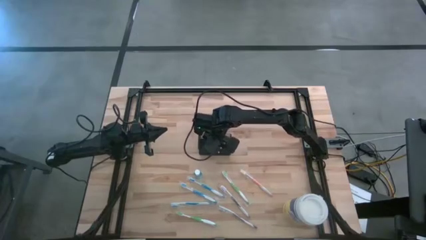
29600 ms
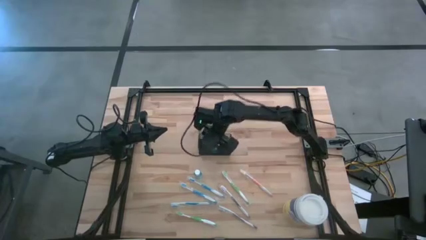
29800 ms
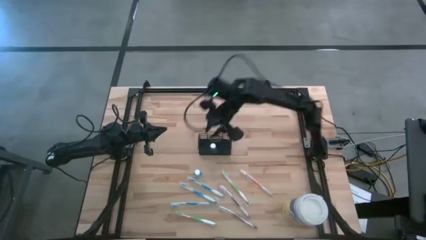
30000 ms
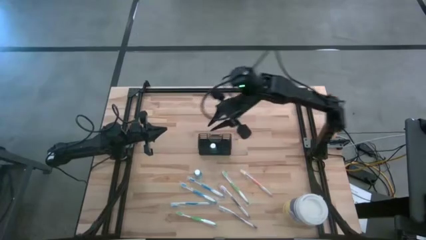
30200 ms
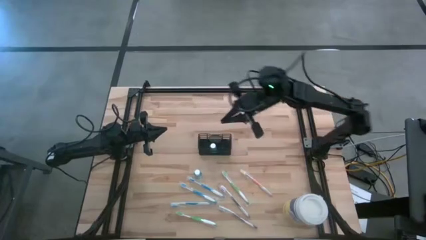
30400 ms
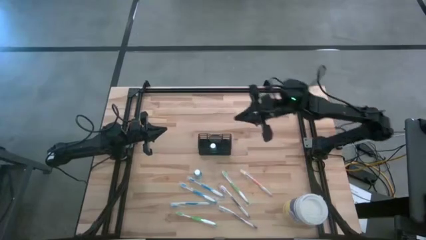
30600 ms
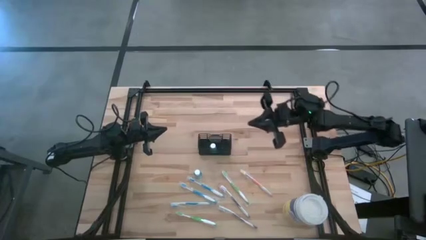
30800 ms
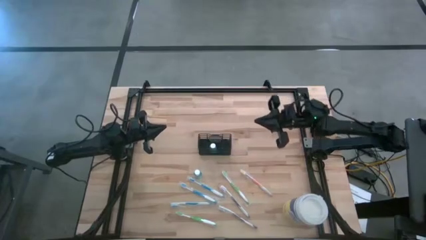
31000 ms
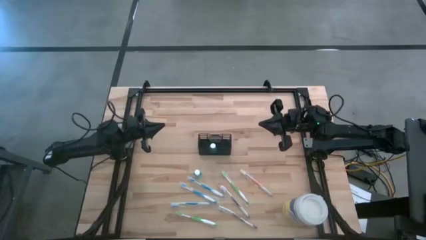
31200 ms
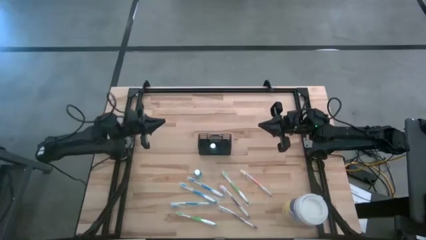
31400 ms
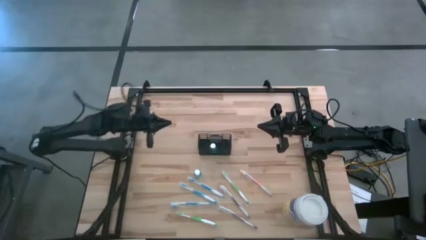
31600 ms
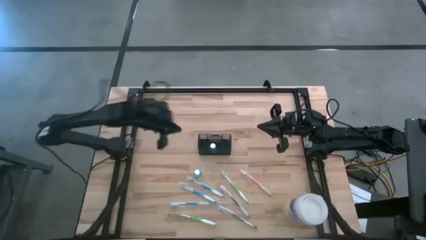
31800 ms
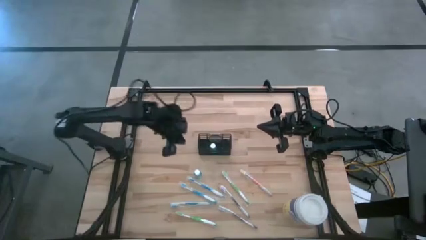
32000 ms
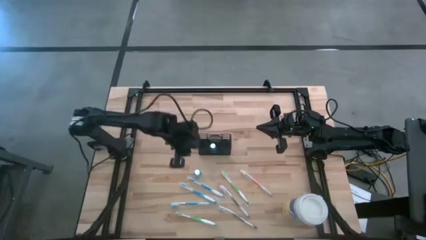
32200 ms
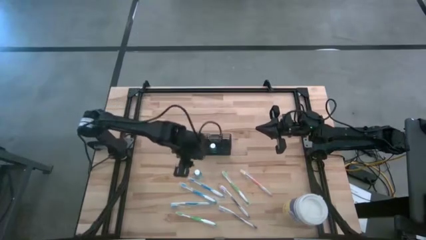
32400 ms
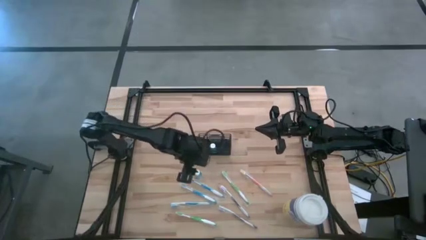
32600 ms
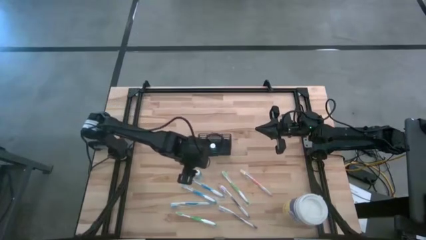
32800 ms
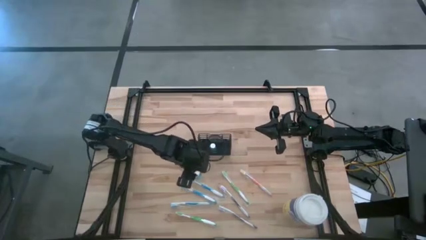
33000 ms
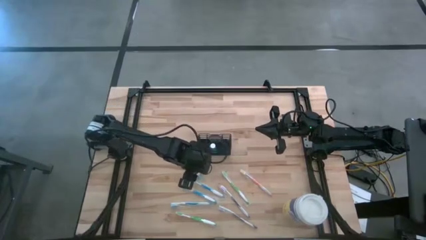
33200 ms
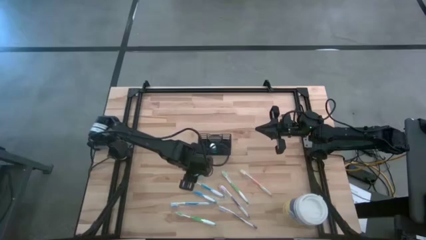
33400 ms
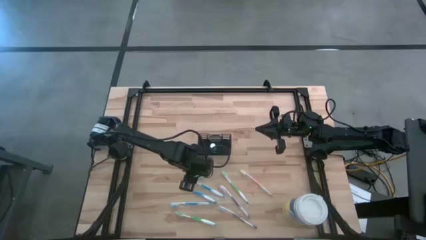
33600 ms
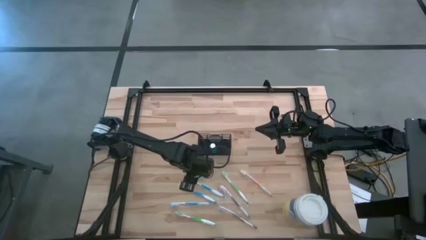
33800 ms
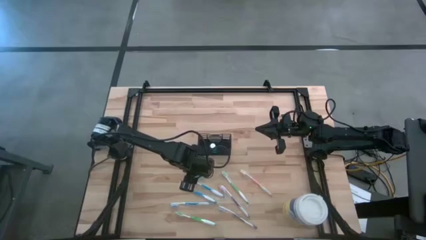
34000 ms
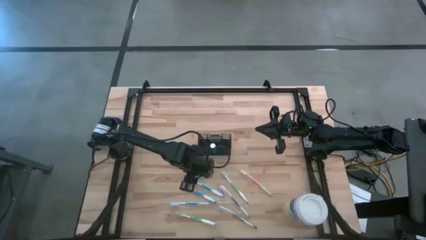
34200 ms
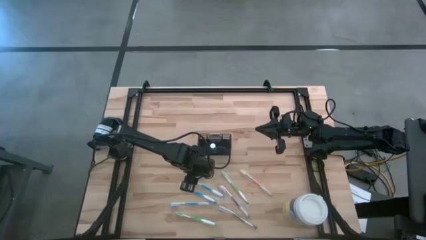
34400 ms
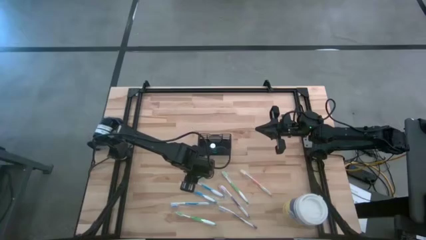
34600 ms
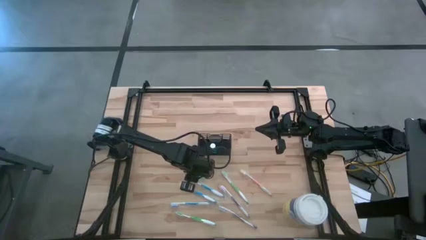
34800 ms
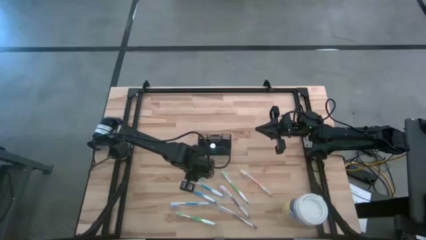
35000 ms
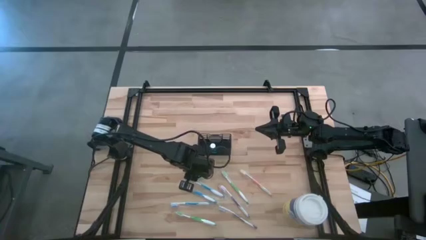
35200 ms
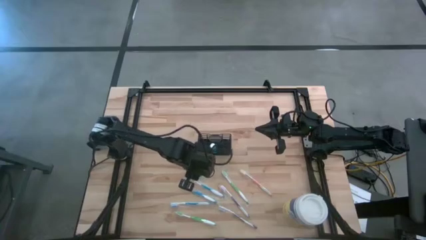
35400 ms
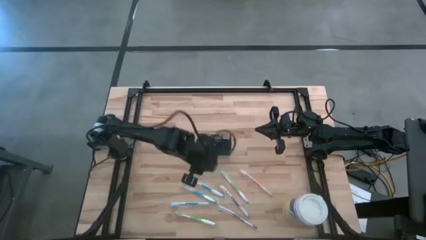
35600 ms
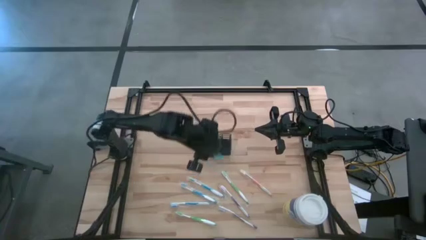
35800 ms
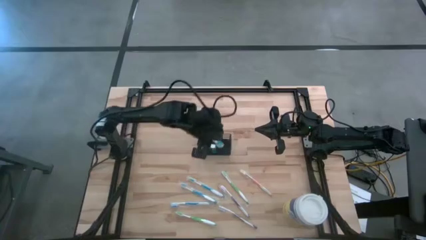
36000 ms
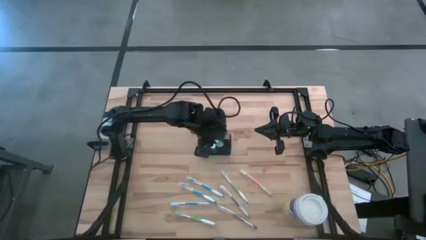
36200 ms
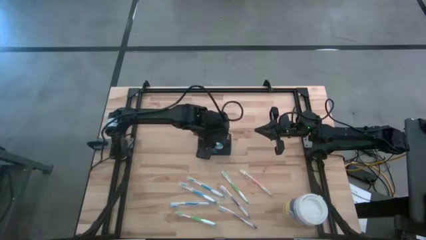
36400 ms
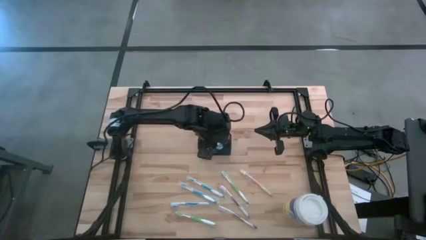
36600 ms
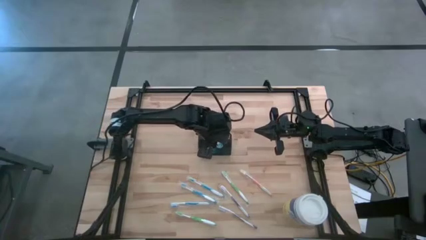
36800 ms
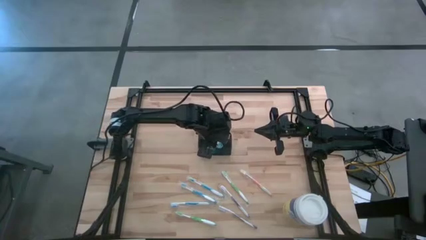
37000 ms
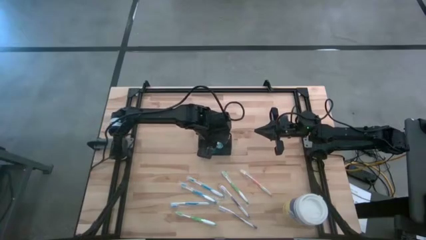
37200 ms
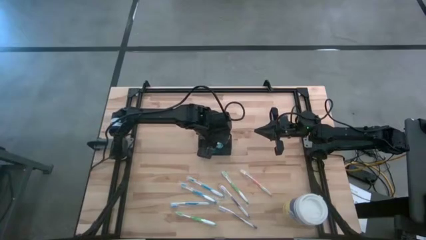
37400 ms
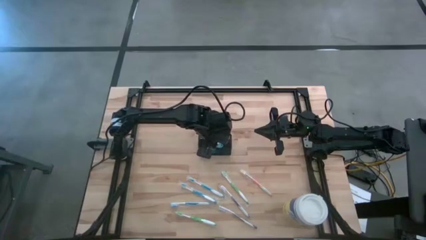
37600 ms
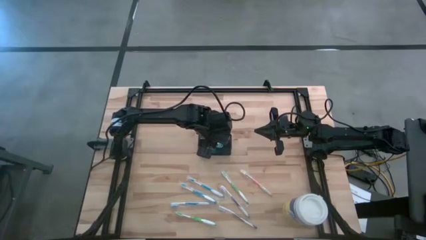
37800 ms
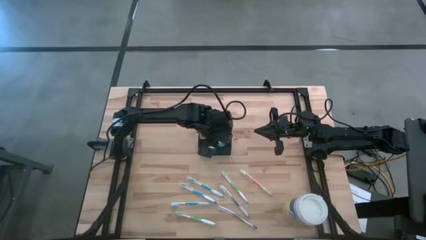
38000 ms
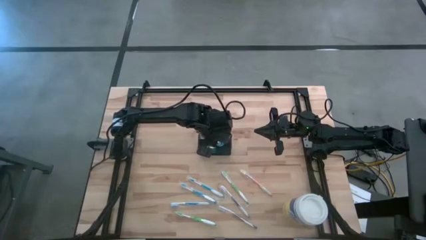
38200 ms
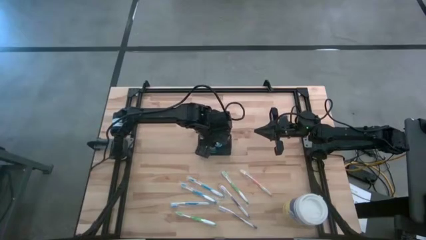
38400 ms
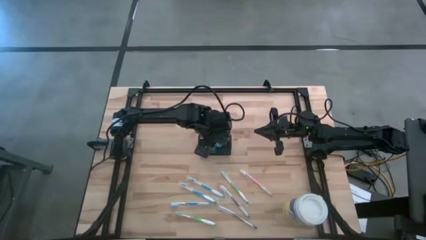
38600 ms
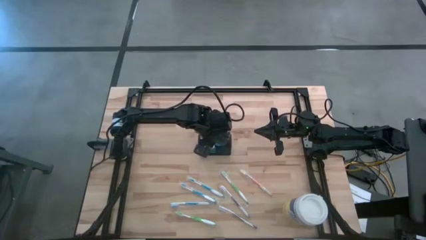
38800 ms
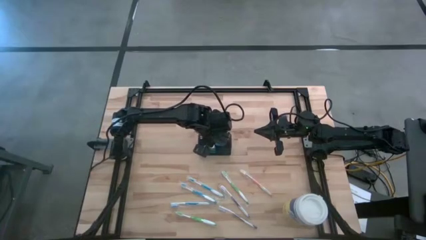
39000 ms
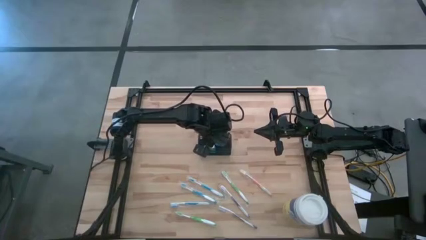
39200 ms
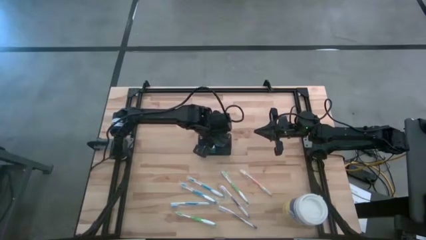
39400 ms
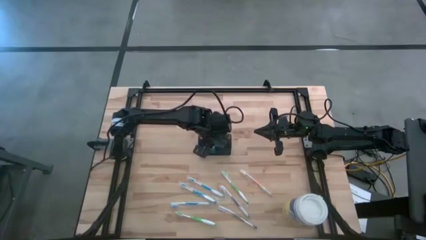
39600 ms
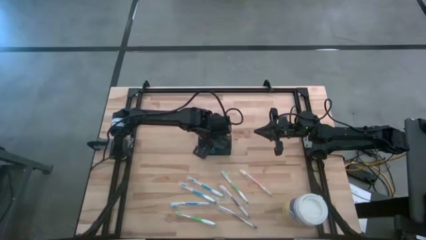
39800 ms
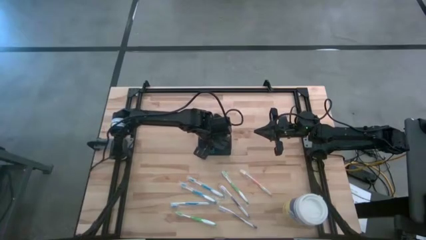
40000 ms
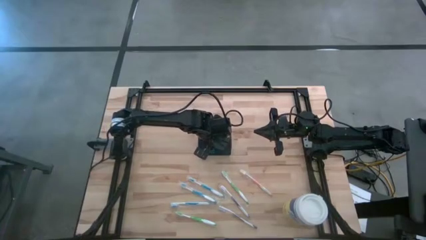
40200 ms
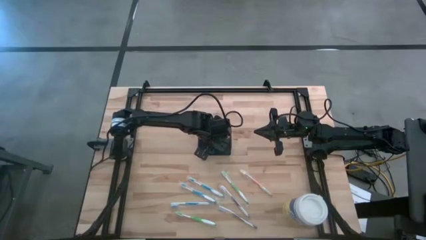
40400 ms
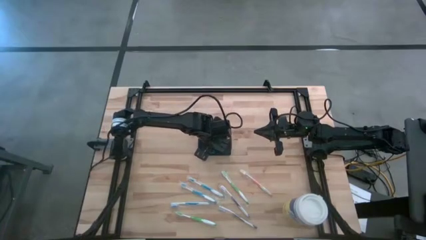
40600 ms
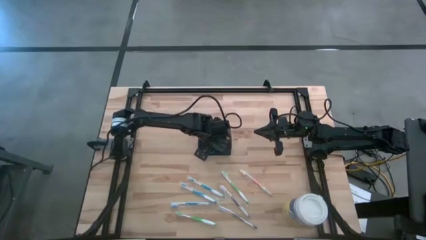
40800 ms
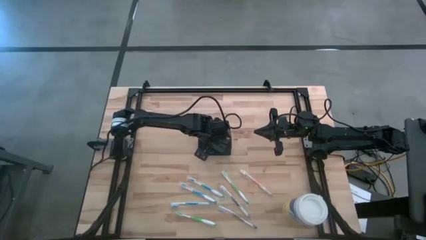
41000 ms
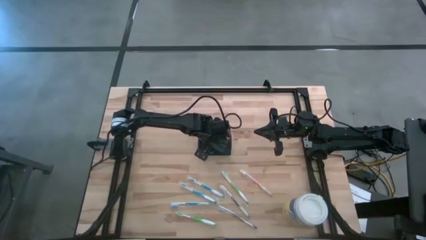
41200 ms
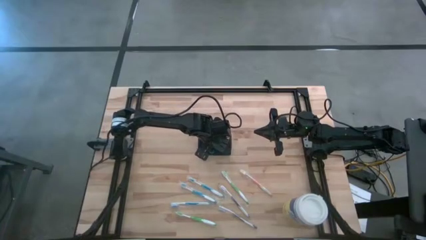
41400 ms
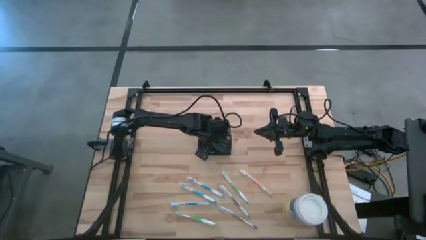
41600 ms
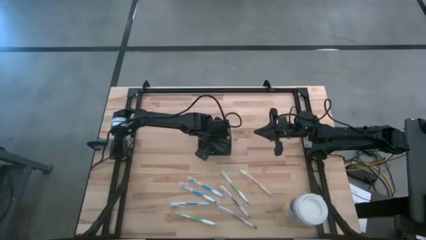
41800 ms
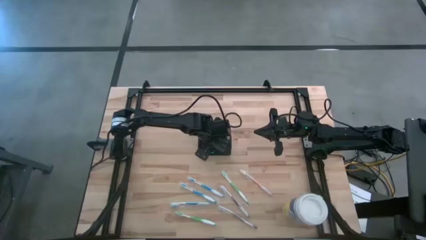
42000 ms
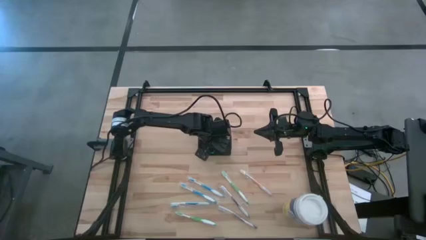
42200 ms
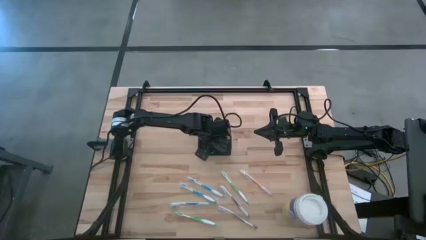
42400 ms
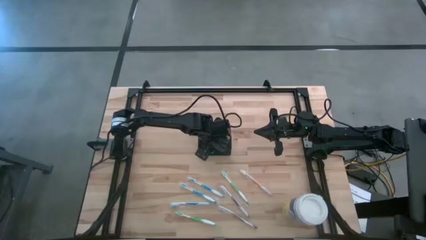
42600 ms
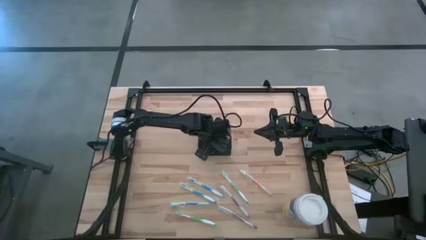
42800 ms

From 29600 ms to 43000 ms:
Task: Pick & Place toothbrushing station
Put the blue mouthwash into the black mesh organizer
